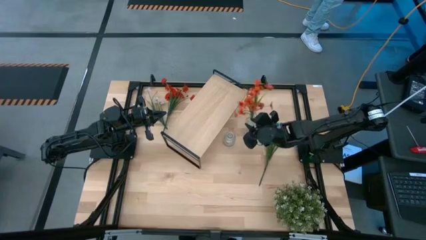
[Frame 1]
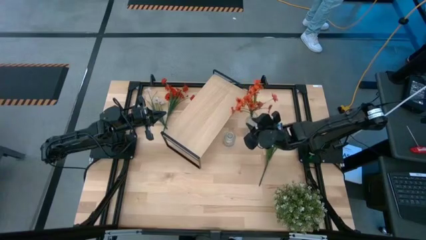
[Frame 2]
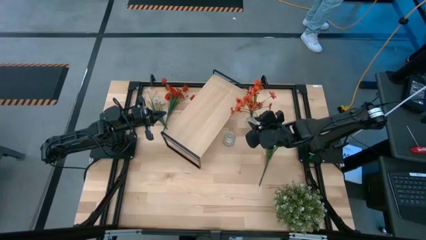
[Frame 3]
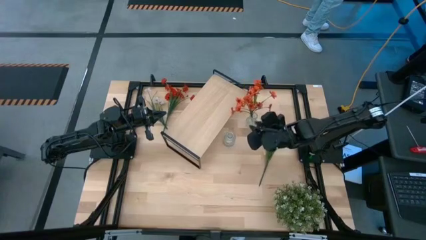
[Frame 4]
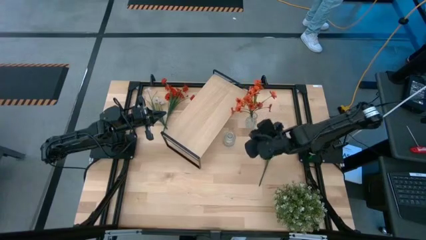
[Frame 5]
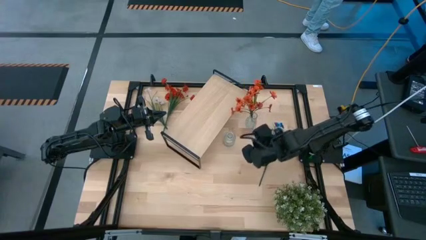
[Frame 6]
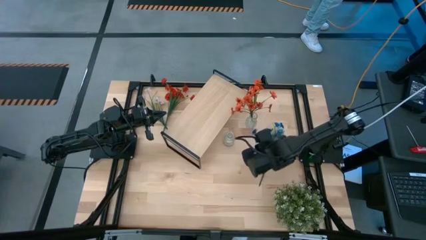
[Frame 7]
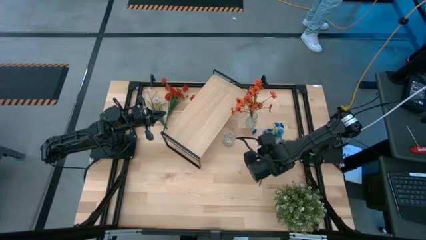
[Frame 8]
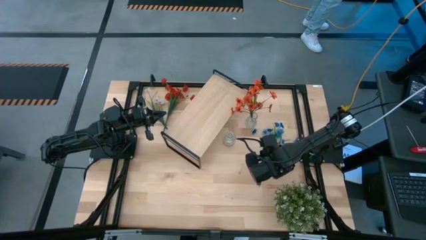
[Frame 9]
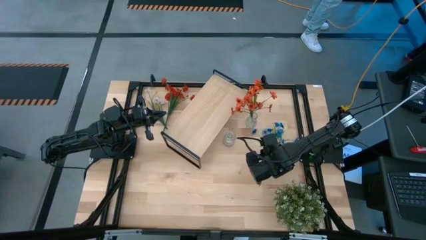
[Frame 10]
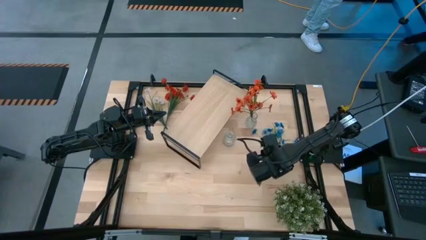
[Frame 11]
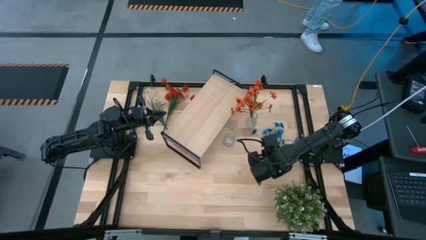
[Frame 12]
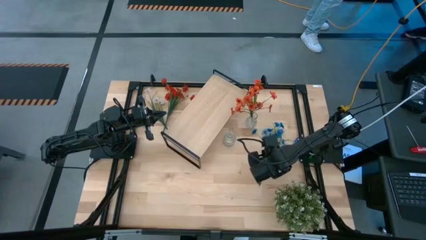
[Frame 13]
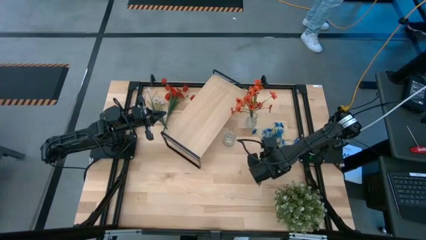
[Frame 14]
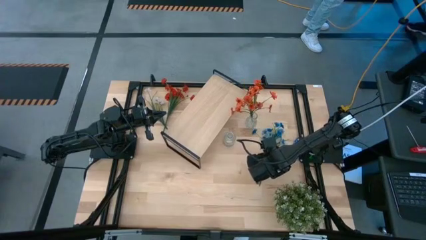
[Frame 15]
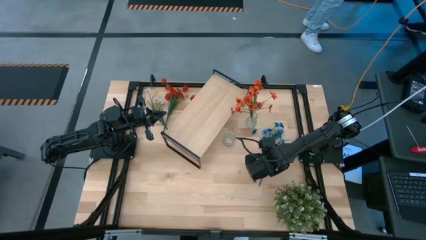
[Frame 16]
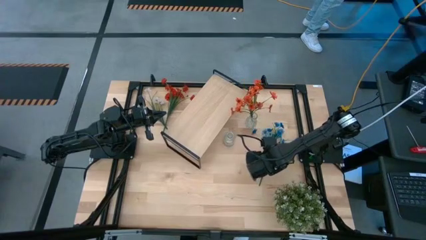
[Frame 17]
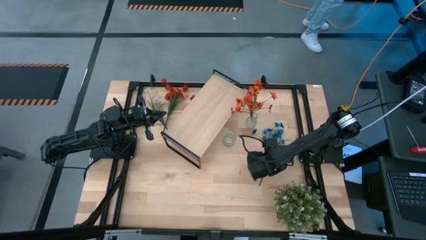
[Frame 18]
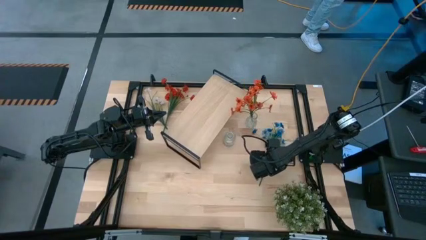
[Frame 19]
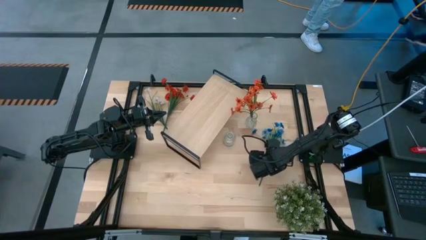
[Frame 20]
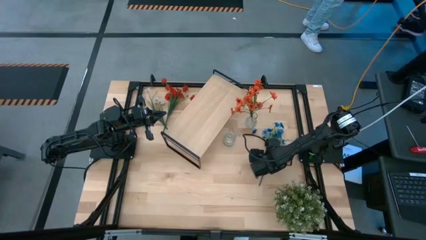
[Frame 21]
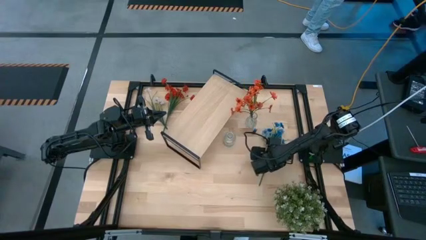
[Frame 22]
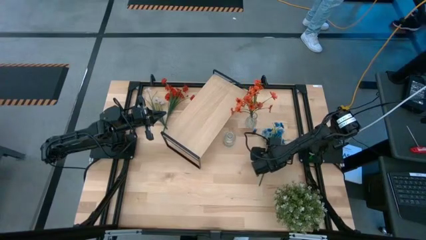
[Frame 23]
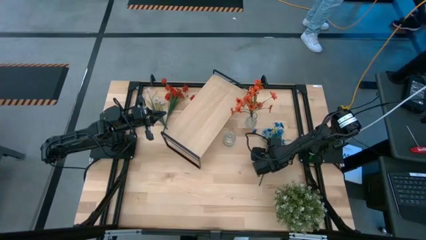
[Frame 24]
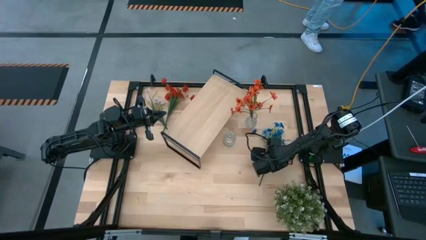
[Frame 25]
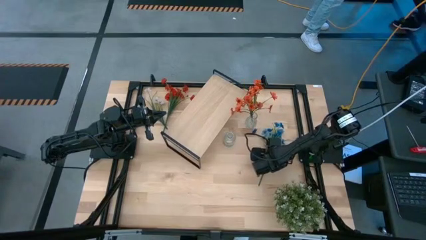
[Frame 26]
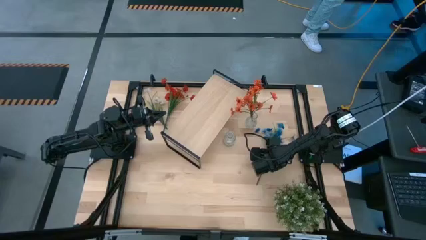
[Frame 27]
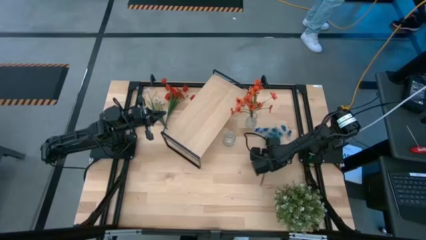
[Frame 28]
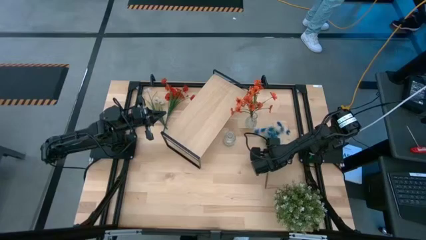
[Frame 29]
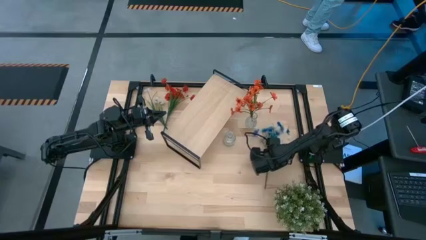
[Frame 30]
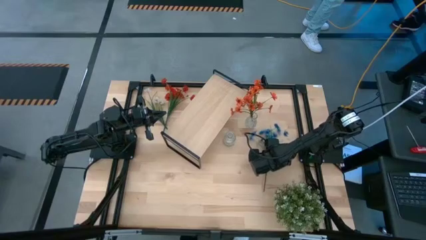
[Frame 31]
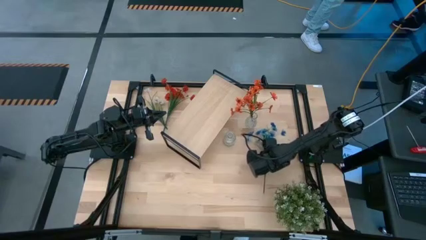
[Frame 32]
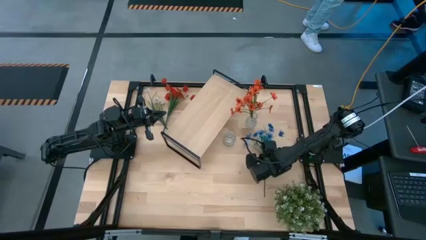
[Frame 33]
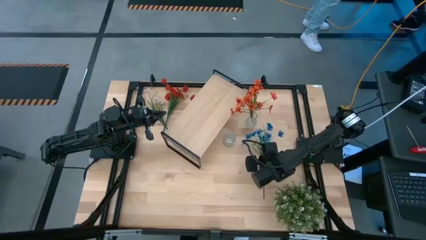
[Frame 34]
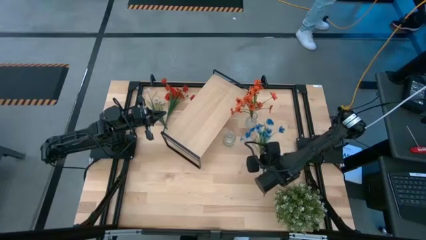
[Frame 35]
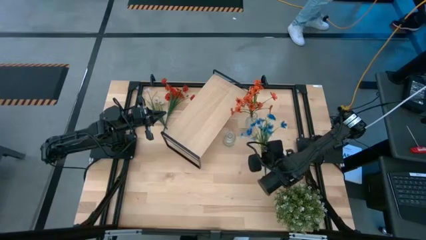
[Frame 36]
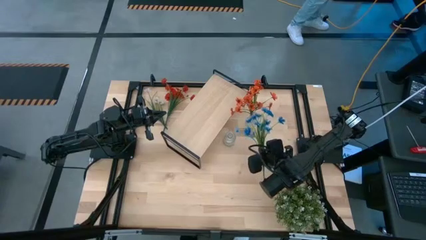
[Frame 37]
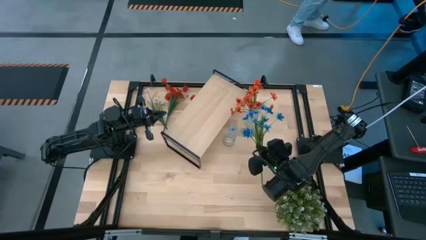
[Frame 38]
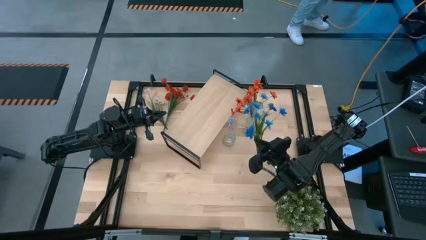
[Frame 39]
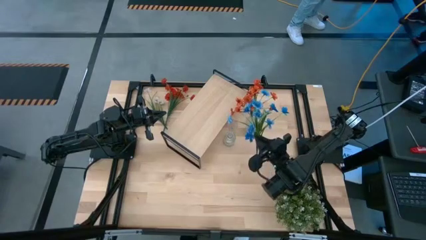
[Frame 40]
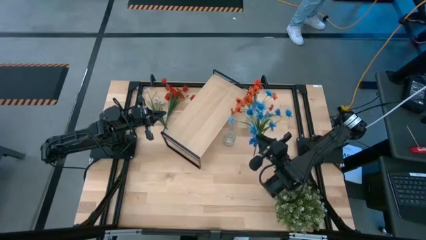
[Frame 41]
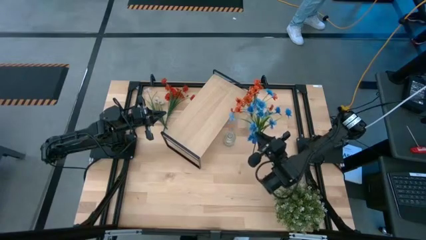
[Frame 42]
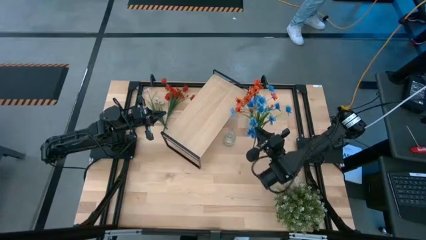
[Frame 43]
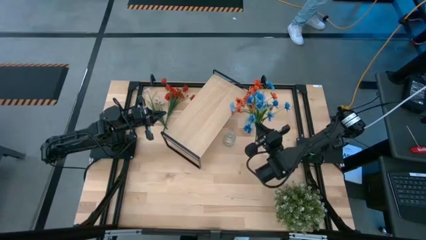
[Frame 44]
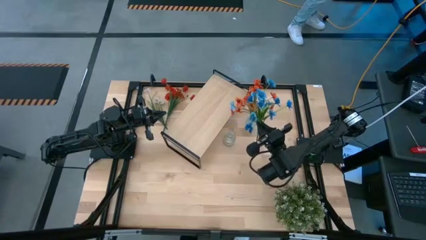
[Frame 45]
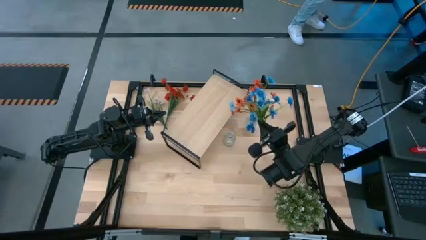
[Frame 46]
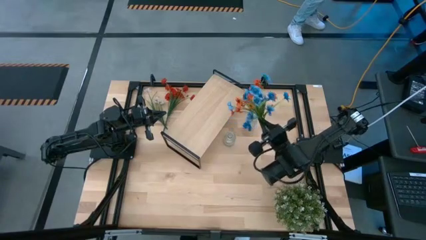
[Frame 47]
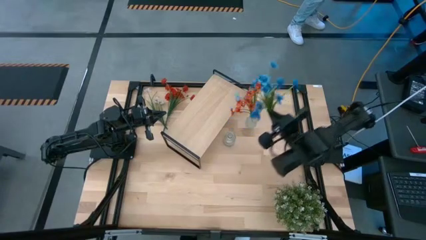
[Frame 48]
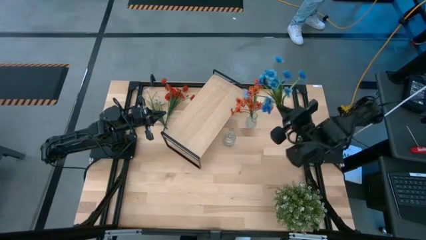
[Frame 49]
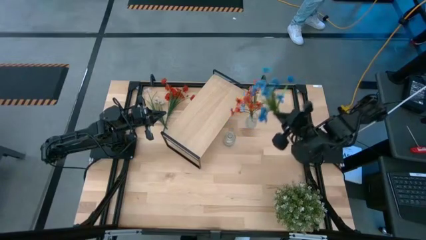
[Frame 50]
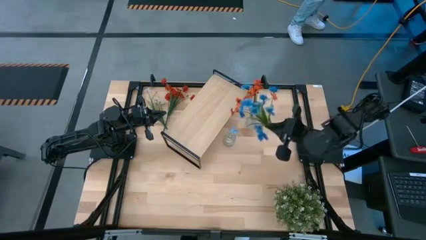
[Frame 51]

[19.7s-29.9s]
Task: Pick and place flowers into a vace then onto a shelf
Put the blue flowers into the right transparent vase

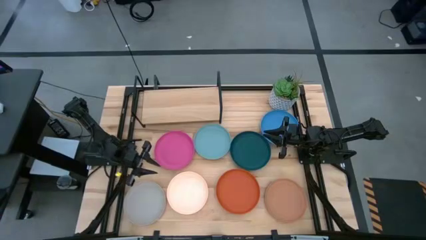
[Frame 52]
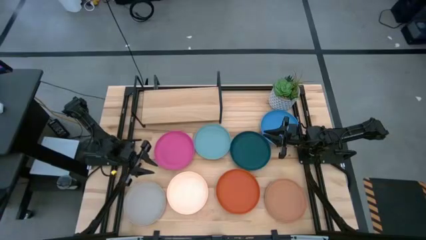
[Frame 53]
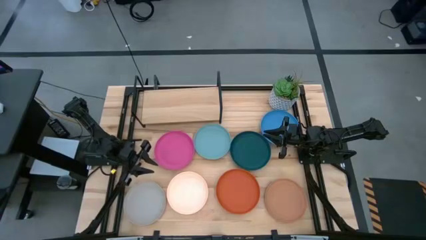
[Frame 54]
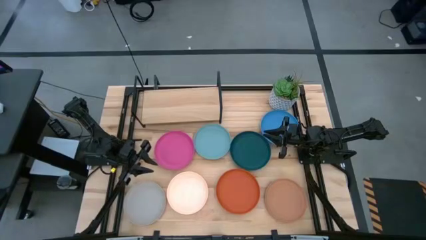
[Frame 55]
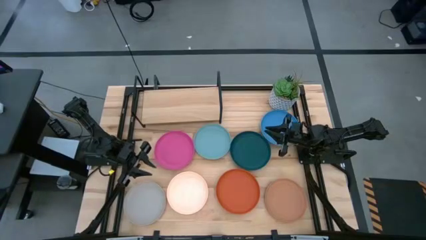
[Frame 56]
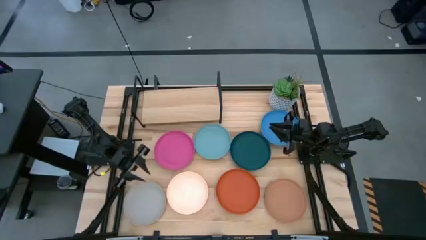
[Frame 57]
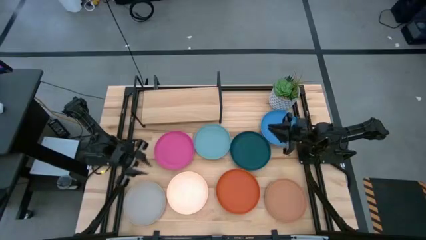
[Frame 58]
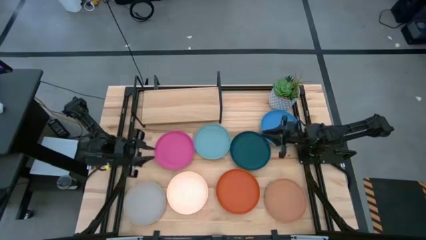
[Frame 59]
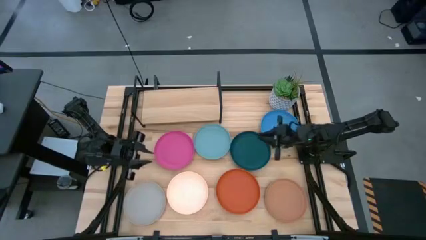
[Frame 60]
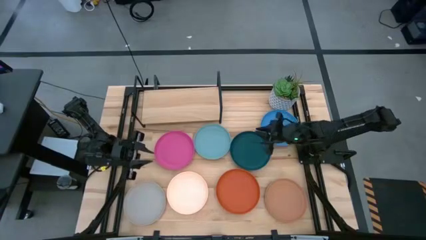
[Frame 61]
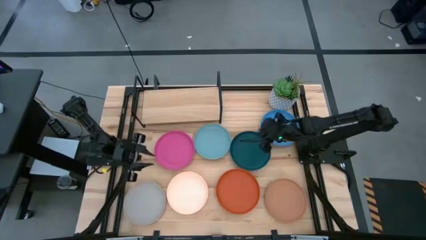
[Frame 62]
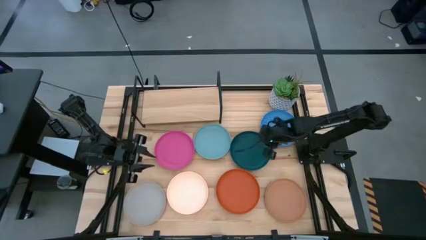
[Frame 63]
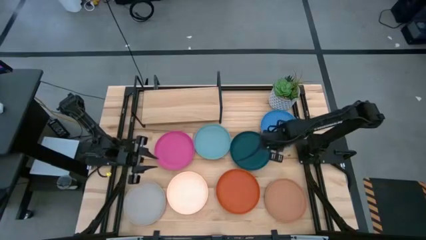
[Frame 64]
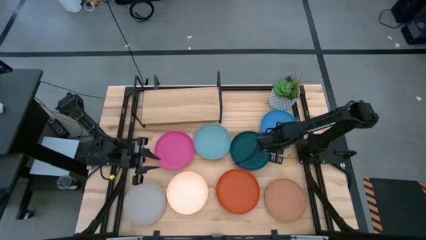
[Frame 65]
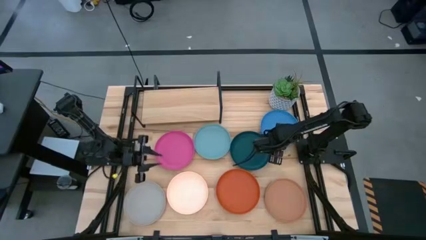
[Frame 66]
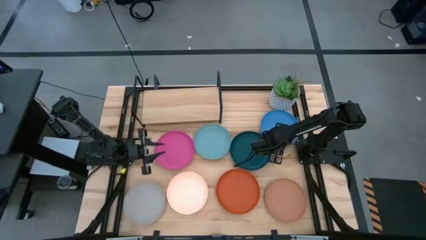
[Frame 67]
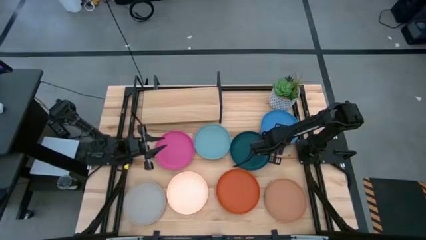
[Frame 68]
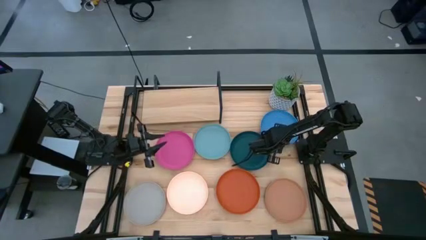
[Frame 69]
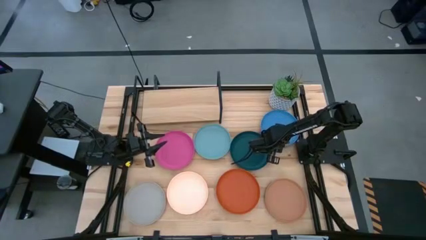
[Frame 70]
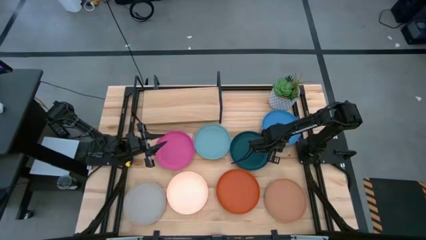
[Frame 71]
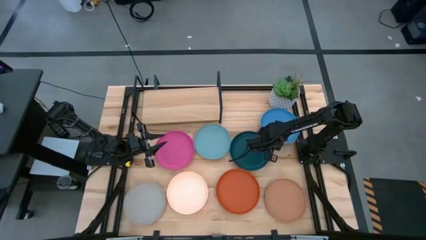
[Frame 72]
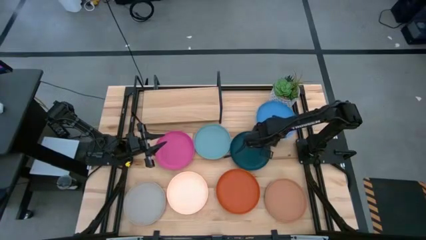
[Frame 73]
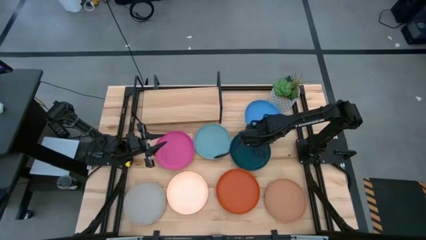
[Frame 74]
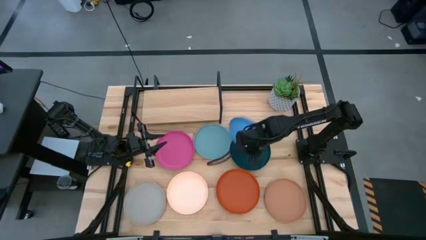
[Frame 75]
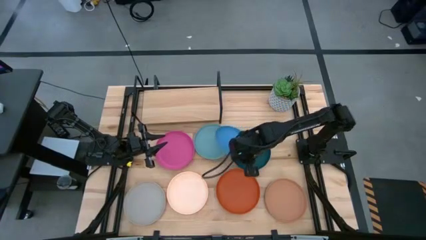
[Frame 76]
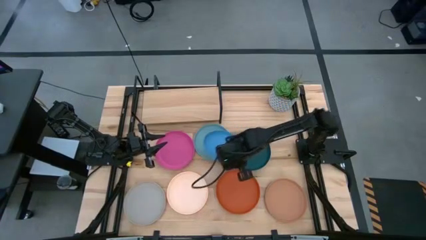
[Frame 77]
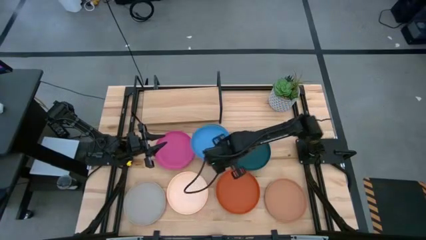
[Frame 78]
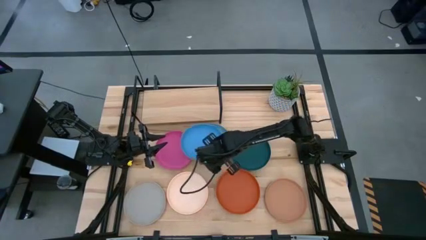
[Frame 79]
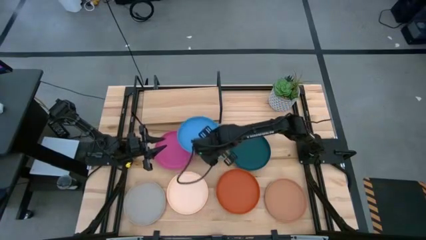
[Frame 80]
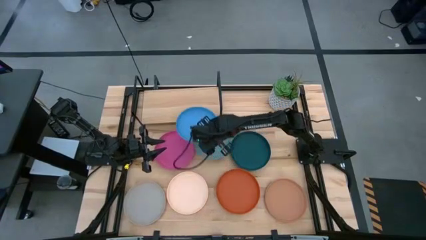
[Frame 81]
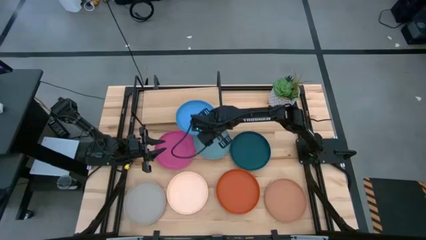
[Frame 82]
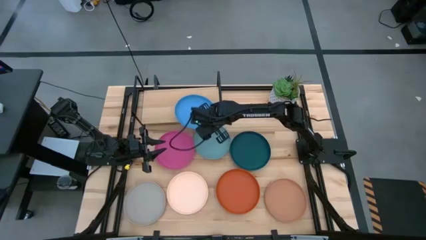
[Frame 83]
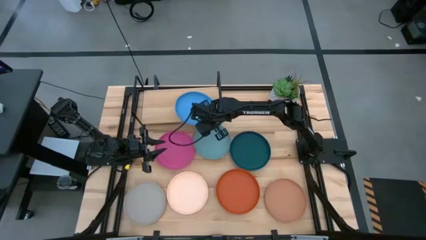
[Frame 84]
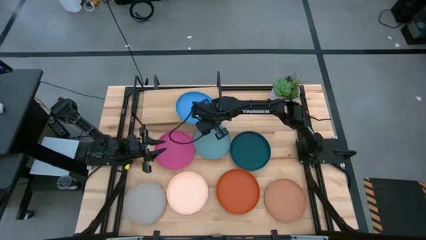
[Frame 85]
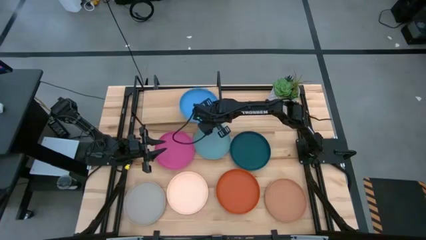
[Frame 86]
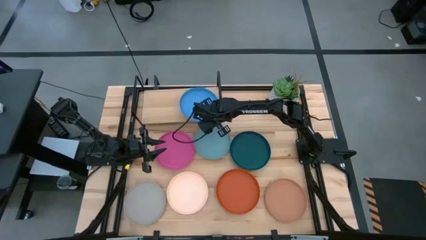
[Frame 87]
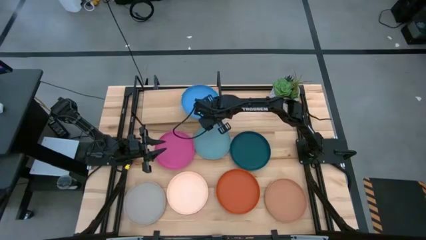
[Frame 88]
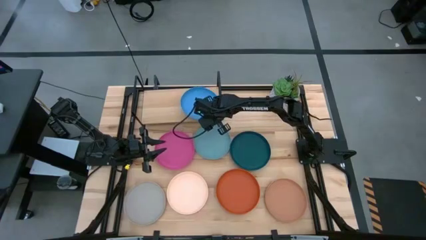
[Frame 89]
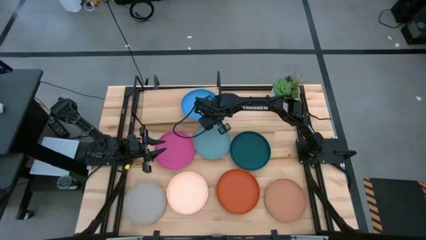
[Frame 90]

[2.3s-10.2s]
Task: Place and stack plates onto a shelf
Put the blue plate on the shelf
